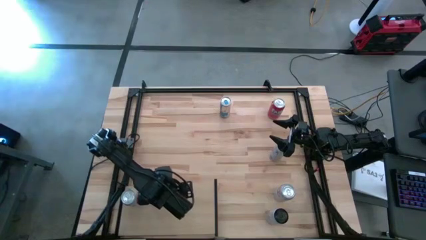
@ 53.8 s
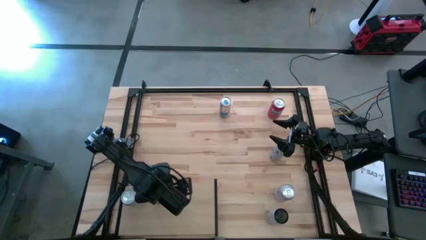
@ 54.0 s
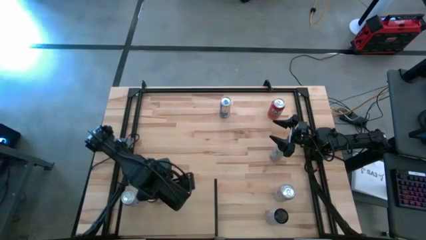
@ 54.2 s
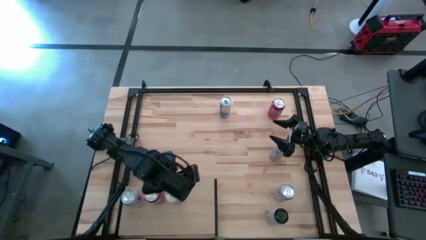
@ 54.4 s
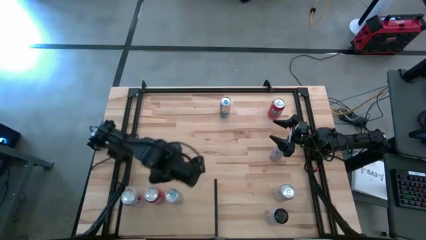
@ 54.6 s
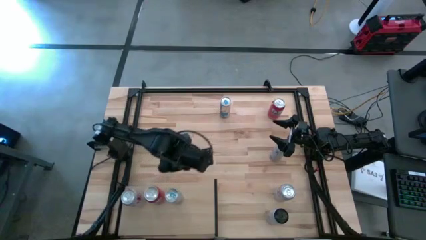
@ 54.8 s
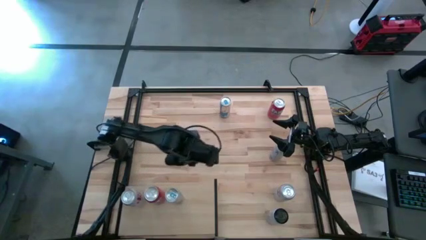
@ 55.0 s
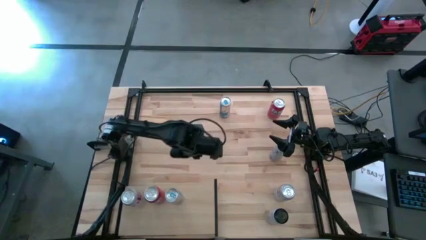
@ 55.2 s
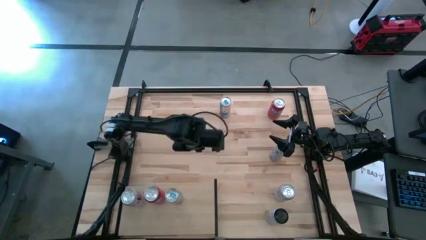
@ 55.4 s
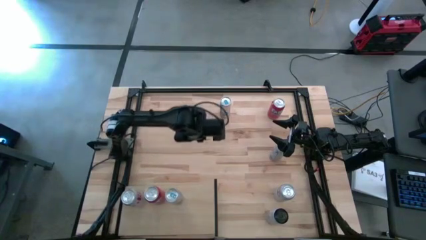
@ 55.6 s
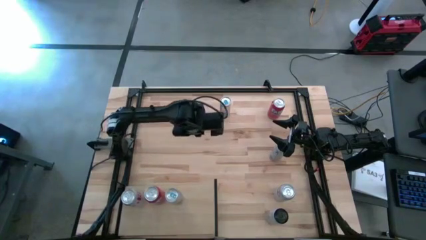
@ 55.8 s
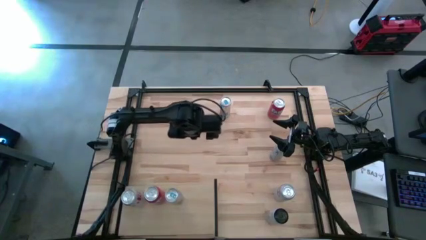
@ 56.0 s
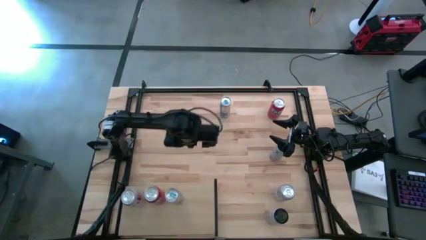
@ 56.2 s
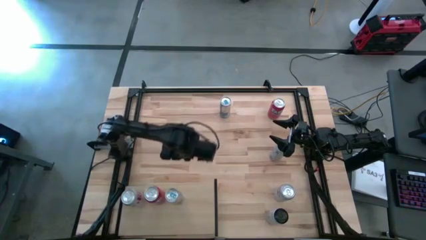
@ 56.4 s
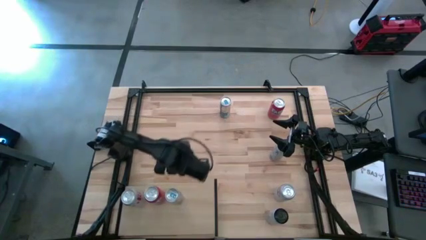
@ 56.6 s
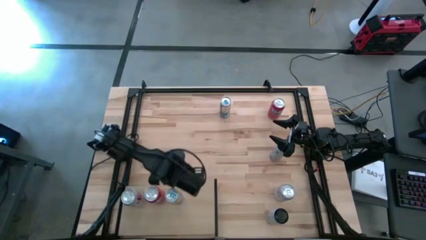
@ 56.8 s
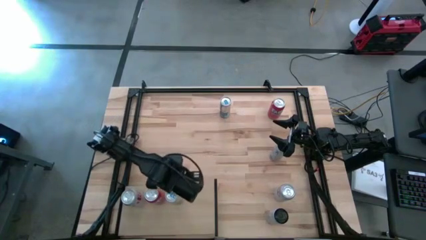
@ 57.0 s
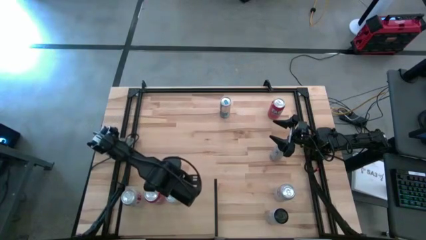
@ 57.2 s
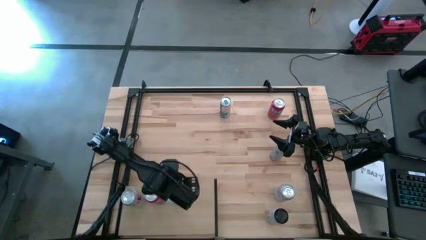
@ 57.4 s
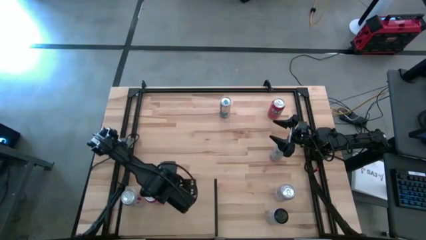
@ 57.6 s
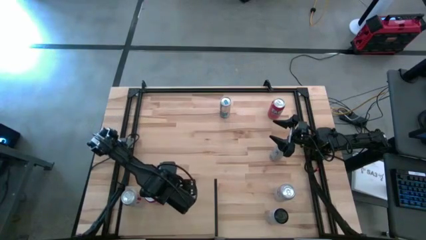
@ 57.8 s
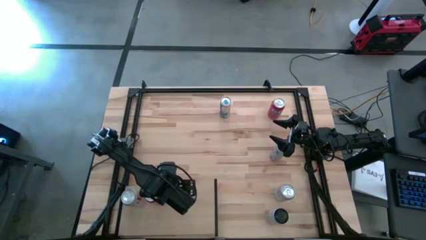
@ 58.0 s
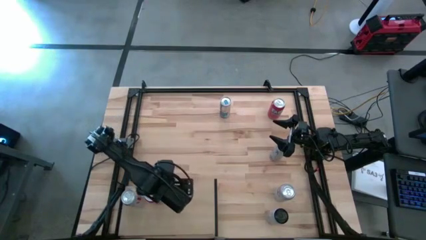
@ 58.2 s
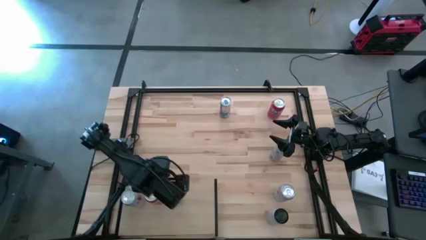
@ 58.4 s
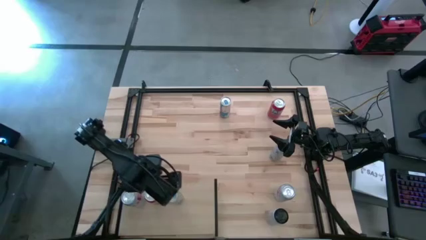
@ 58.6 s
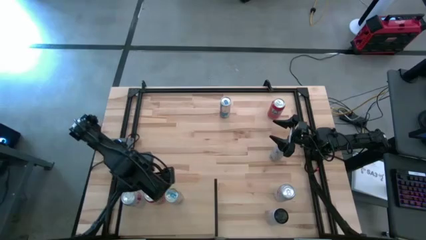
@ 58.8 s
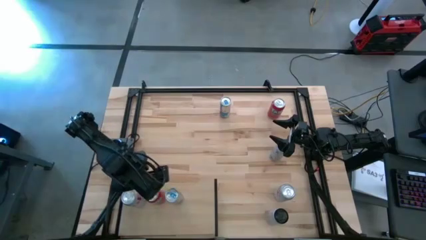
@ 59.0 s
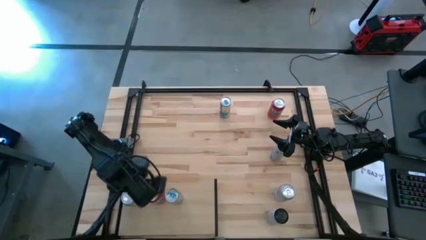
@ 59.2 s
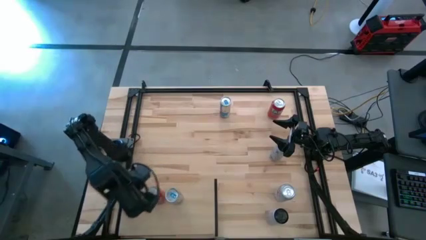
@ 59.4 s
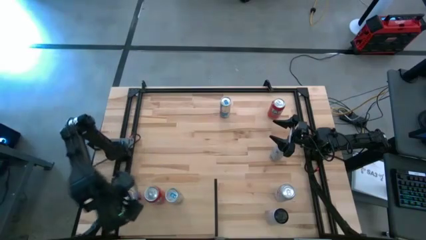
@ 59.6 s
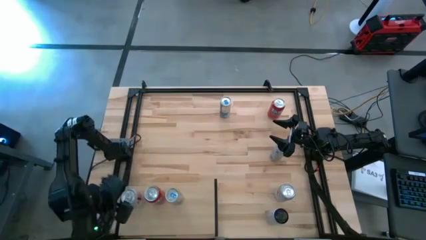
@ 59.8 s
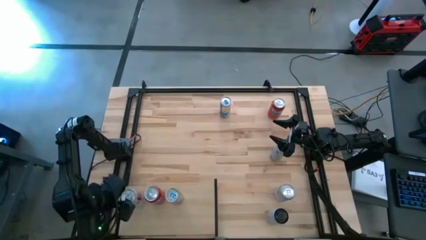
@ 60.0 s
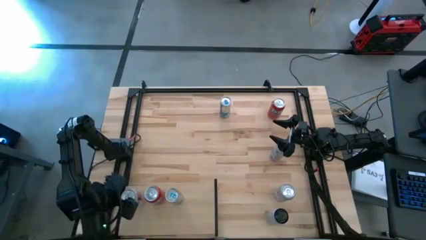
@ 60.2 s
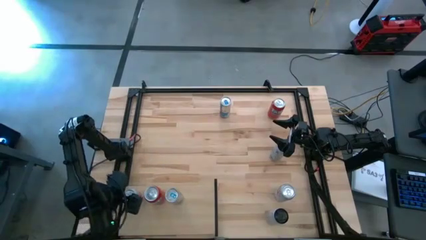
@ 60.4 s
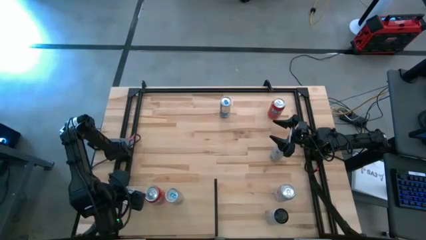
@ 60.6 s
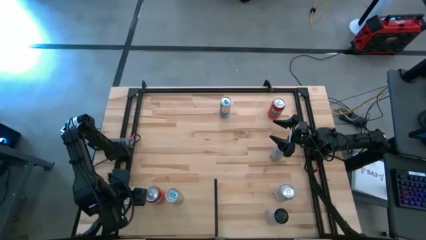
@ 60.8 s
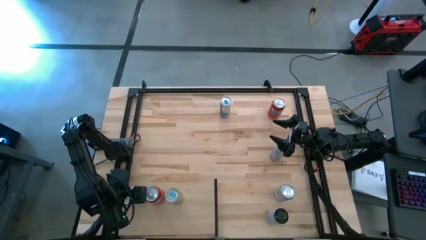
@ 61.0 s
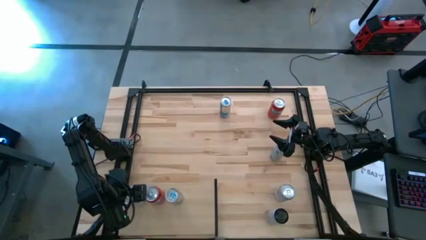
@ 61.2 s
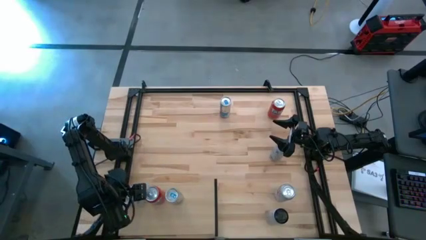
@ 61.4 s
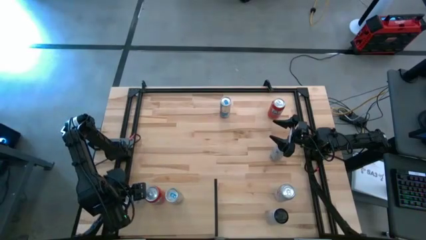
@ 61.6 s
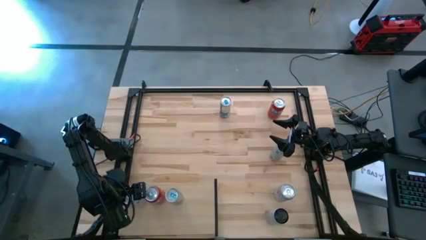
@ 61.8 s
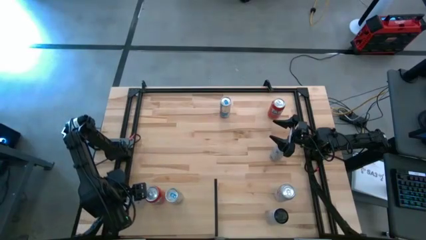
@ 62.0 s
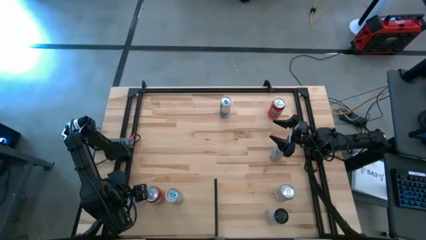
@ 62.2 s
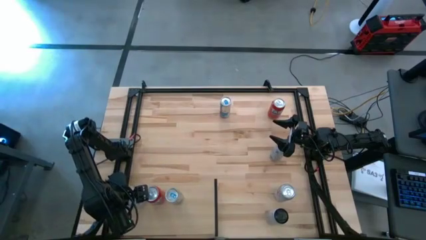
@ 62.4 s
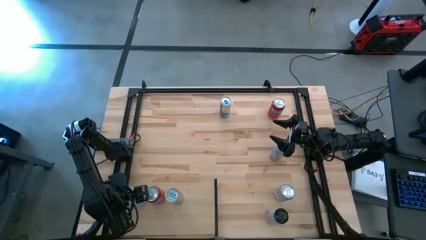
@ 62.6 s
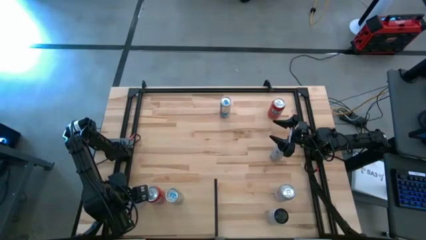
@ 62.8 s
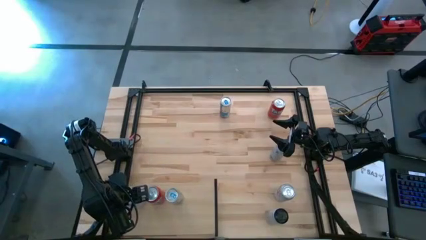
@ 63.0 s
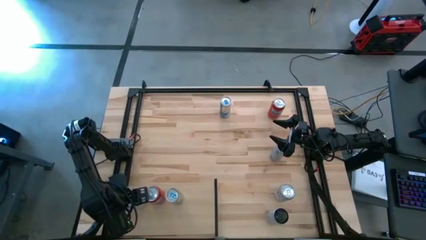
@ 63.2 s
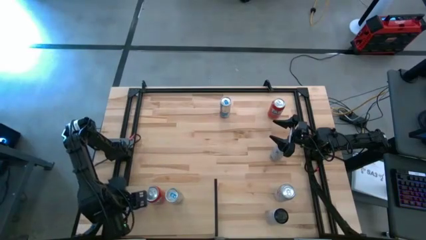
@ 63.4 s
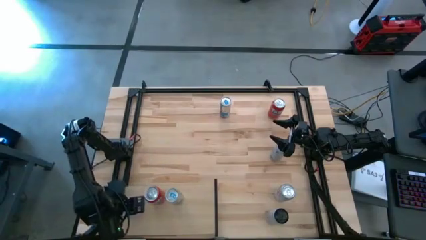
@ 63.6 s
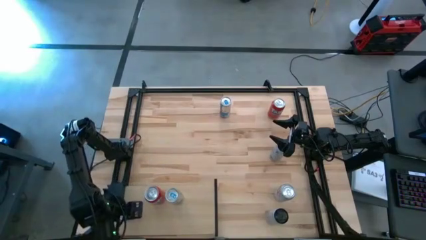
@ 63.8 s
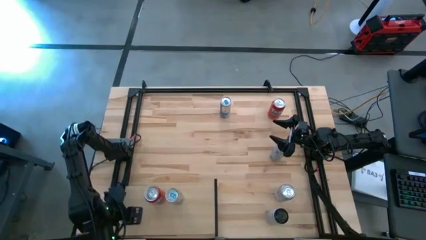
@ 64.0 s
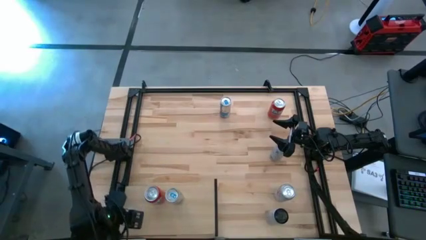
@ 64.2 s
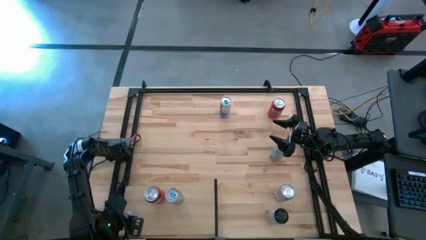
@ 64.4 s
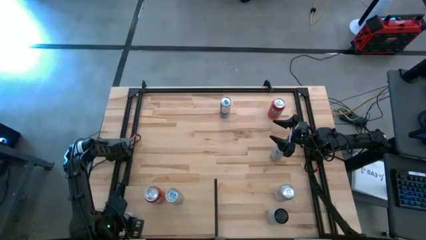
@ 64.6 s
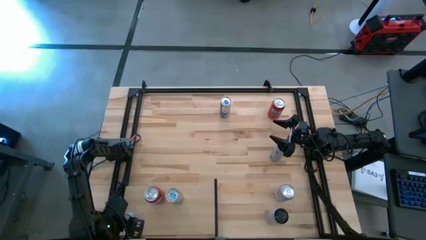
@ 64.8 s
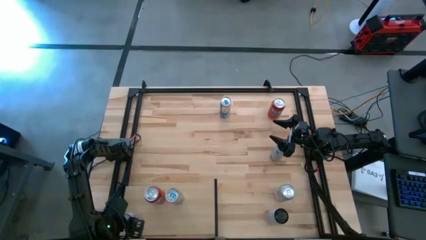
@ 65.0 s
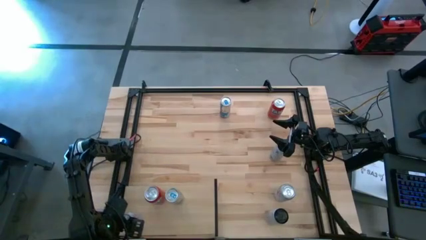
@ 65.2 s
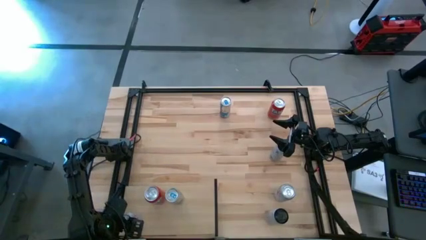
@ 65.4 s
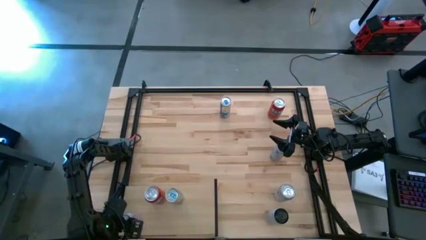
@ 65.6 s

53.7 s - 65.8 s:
Task: Place canned beverage on shelf
Adjust the soda cans on the shelf

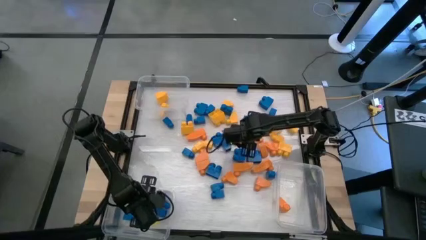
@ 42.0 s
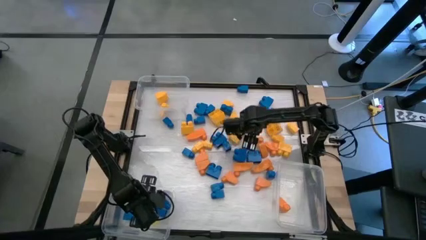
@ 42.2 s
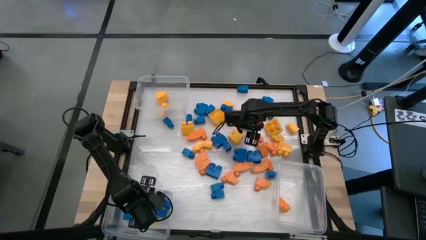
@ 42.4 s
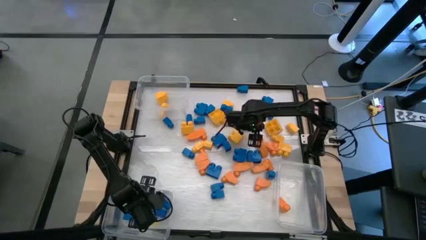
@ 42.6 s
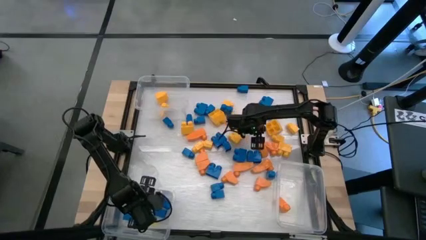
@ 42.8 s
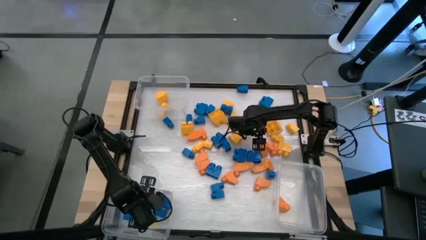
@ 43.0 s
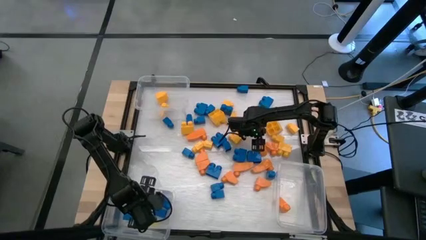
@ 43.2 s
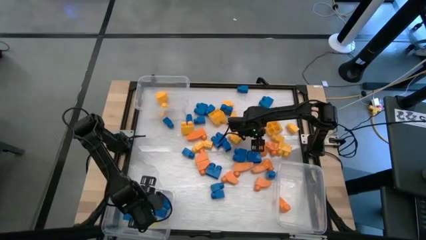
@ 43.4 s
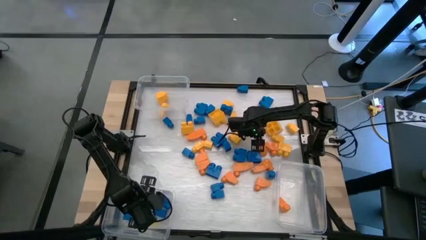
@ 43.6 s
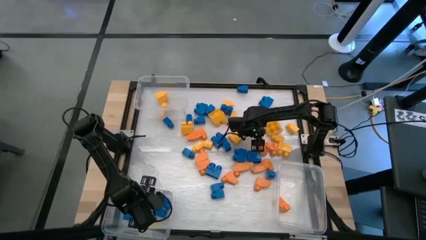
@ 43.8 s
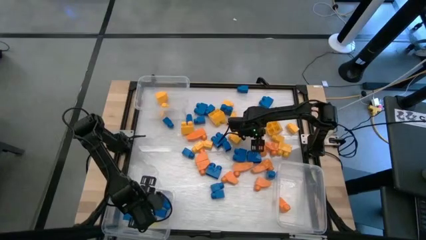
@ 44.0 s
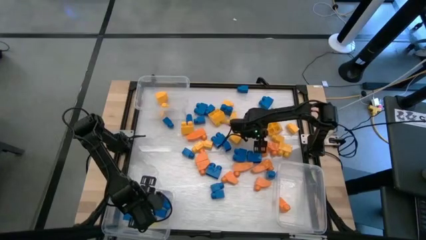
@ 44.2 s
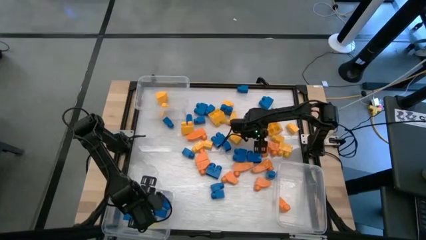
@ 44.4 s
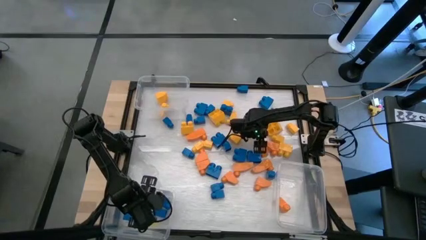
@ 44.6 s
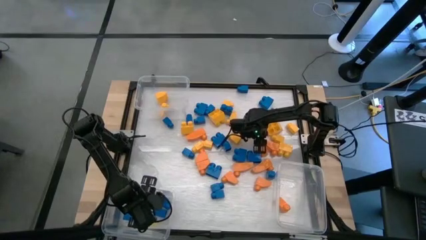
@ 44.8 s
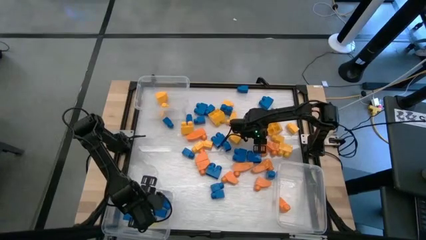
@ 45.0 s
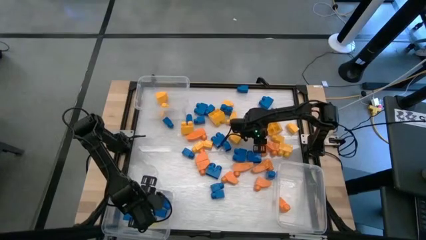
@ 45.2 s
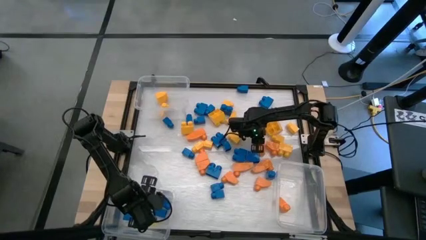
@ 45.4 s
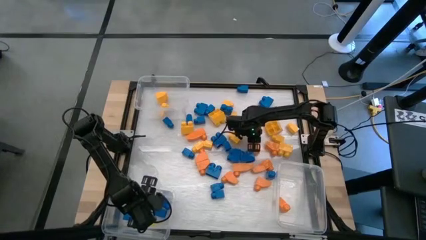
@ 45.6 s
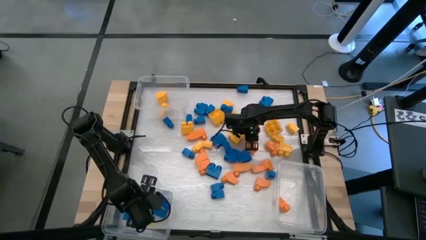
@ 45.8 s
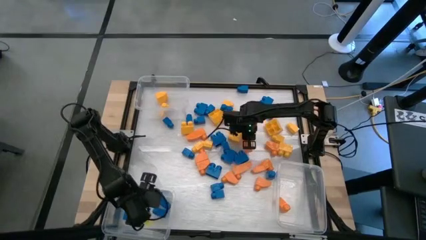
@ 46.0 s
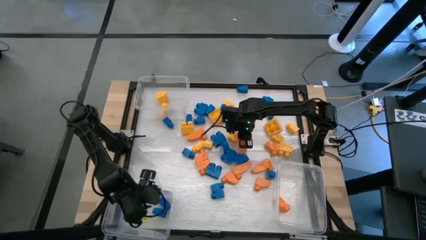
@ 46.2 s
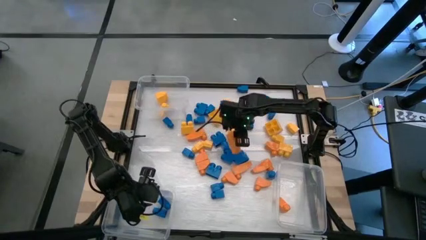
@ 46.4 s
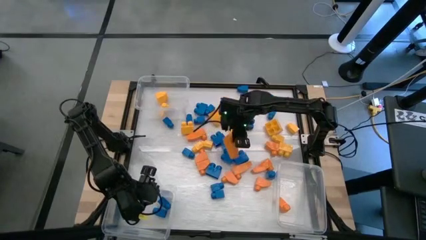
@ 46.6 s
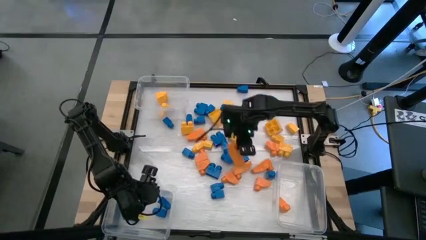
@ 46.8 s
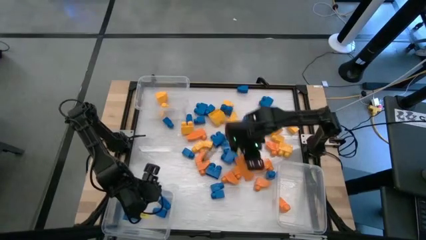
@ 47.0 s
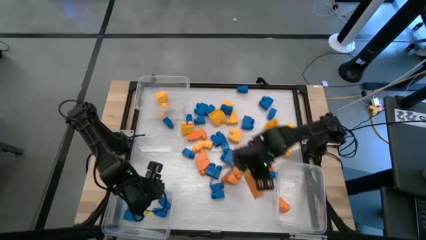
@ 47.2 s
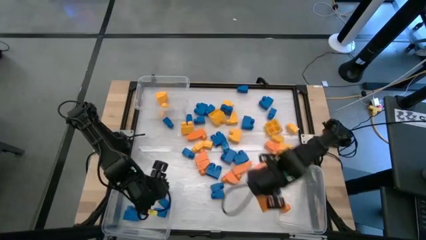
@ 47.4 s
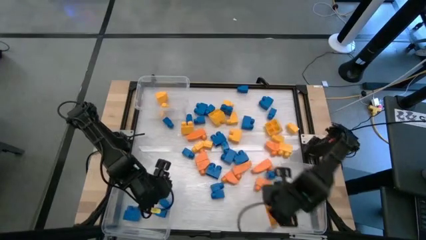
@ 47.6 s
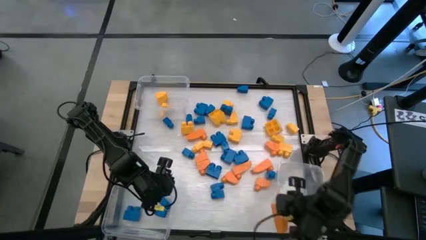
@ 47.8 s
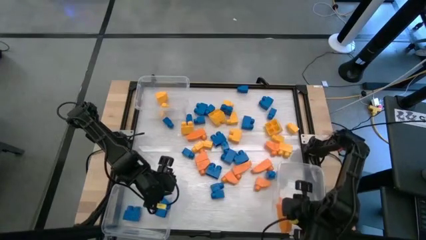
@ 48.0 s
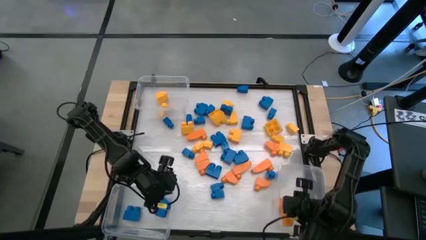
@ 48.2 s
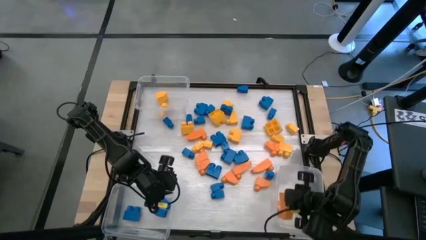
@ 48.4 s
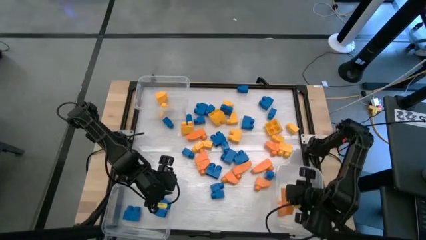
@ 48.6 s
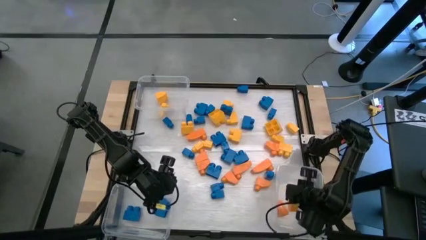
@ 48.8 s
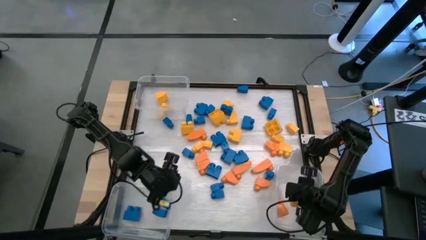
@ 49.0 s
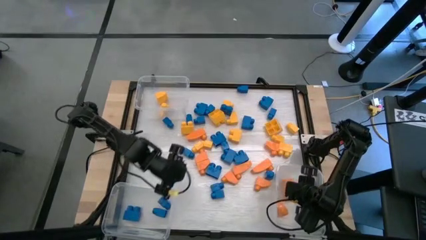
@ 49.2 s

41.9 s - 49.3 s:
Task: Sort blocks
Put the orange game piece into the bottom right transparent bin
